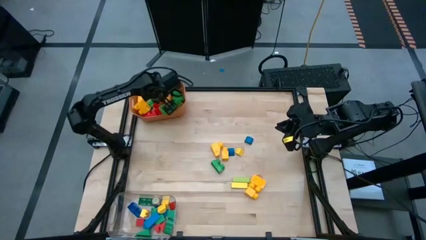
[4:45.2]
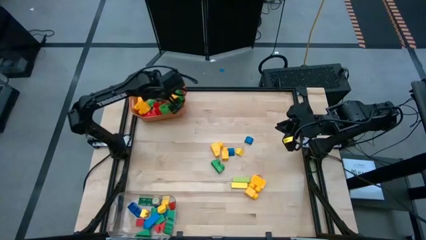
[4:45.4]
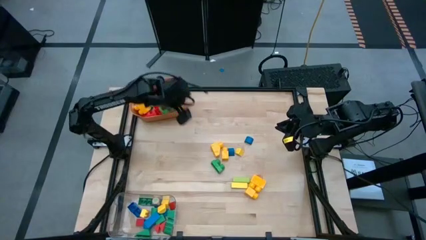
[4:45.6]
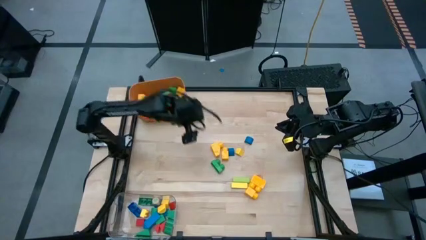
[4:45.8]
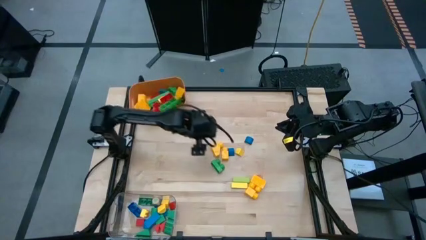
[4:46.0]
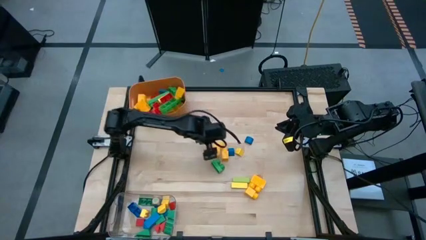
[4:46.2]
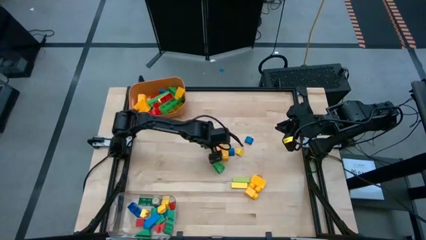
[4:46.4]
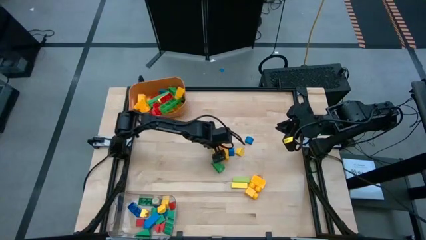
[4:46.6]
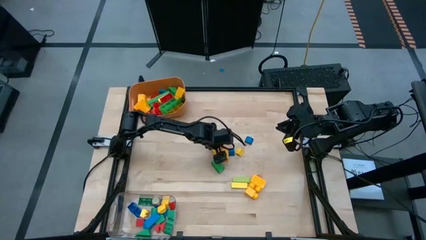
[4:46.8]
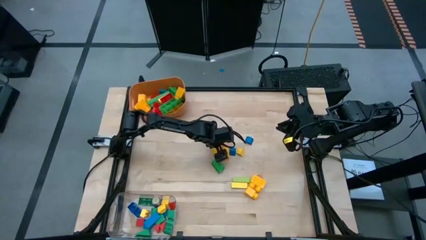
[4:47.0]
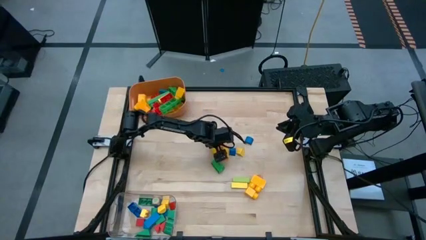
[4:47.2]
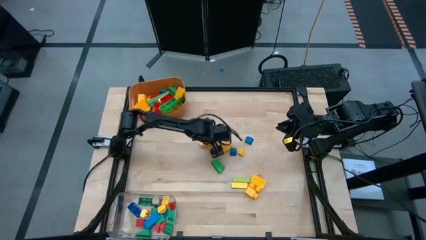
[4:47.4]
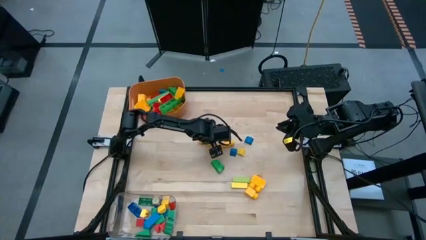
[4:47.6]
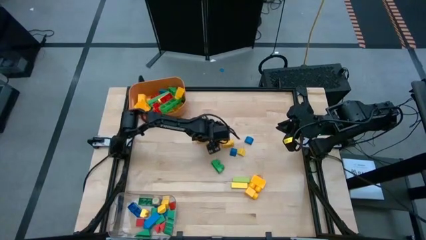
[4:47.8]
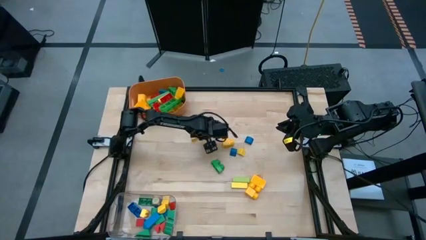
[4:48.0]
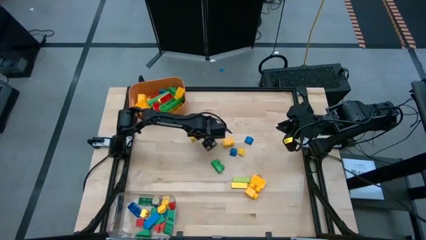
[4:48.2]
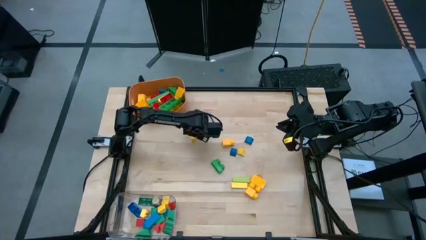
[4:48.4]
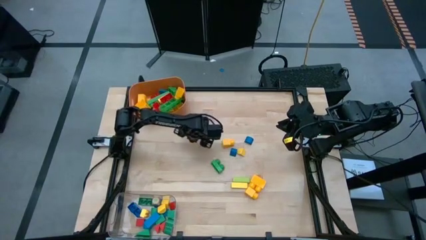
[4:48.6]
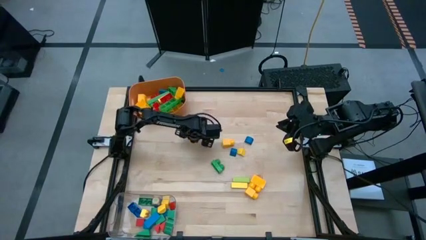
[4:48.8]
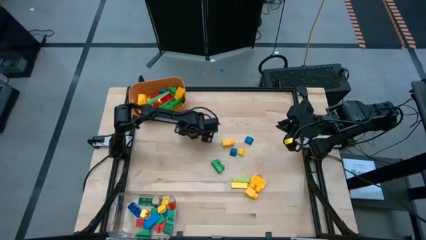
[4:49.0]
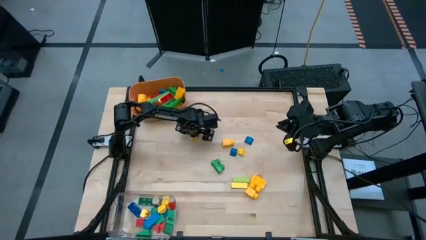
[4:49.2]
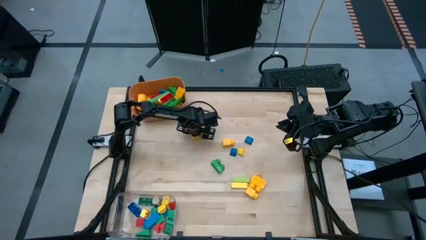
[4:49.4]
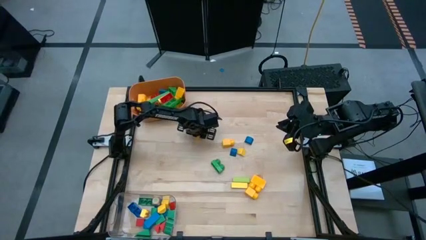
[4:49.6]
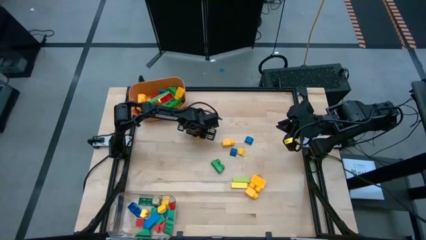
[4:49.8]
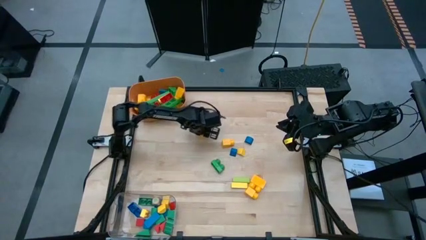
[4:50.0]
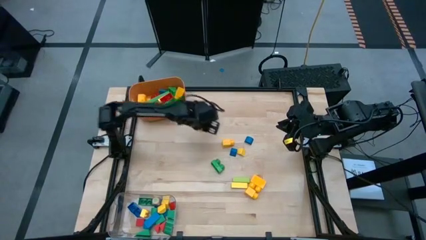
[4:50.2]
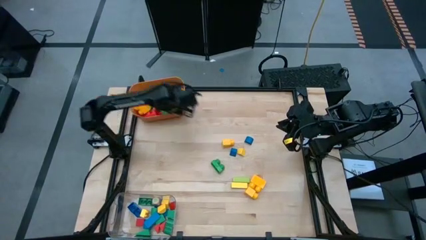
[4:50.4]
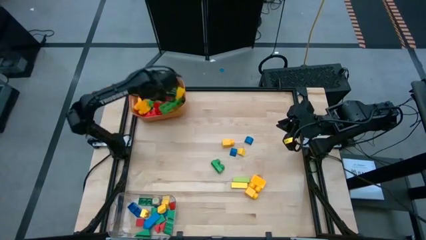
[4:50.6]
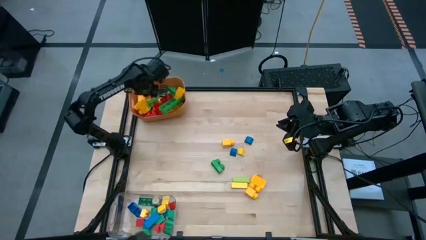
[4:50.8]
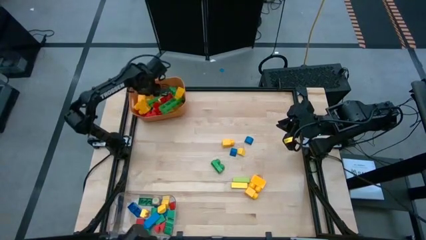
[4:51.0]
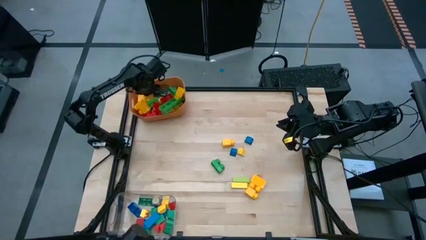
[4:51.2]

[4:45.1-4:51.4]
Task: Sort blocks by size
Put the big yellow game piece into the orange bin

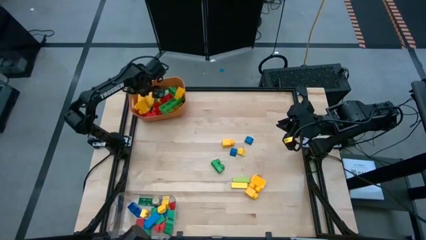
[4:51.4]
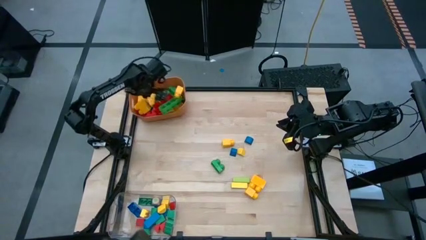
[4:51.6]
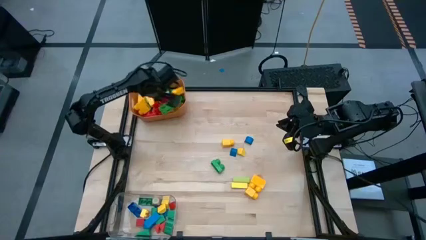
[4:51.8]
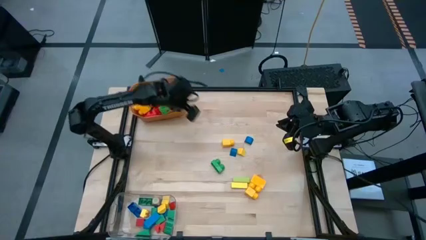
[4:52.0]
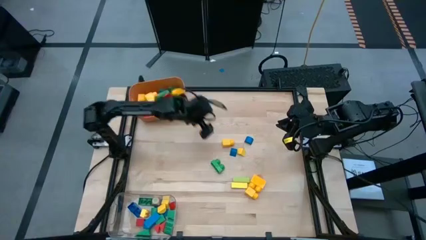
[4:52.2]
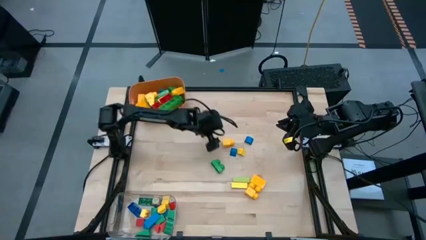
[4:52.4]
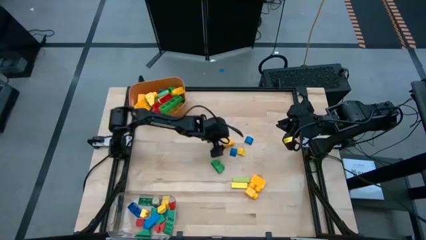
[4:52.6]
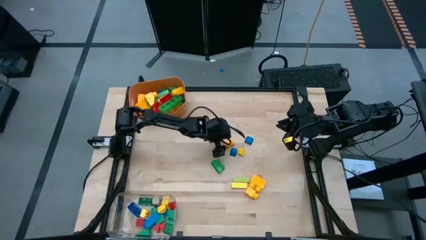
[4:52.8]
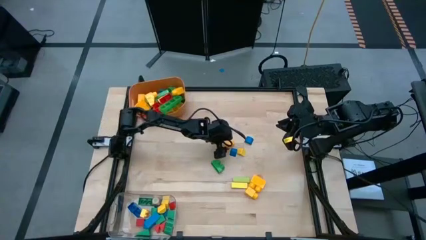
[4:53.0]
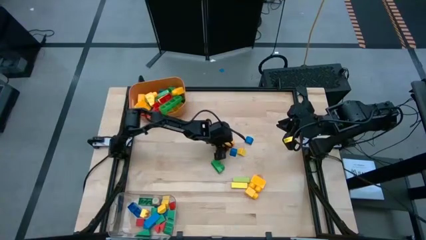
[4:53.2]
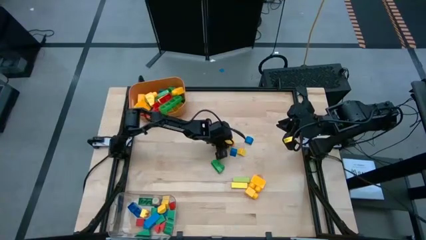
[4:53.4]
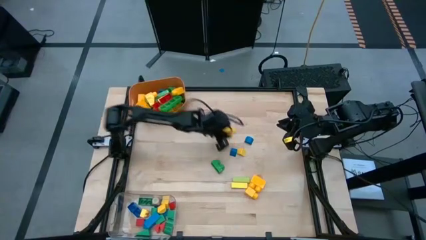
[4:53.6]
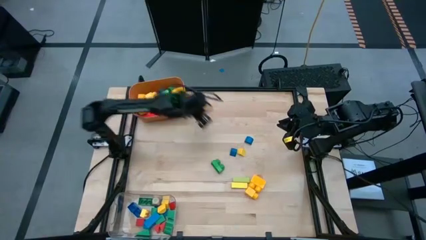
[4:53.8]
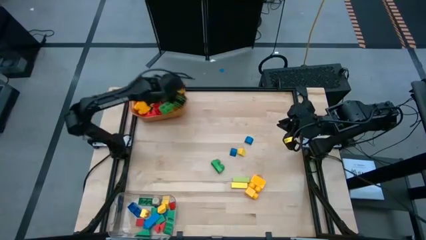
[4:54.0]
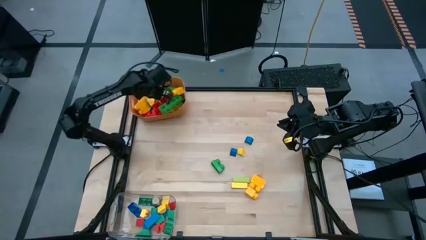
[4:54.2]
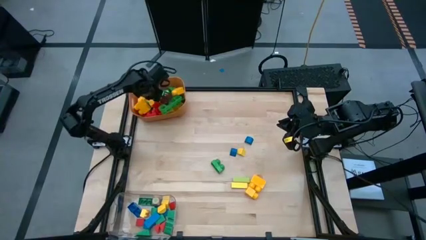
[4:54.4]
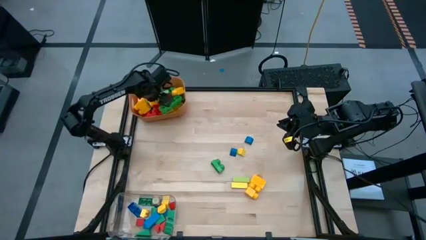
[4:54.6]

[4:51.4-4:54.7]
Put the big yellow game piece into the orange bin

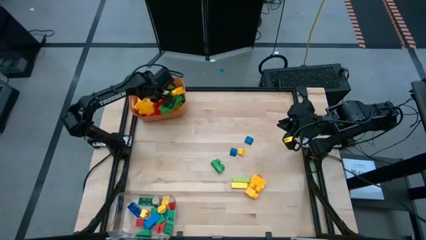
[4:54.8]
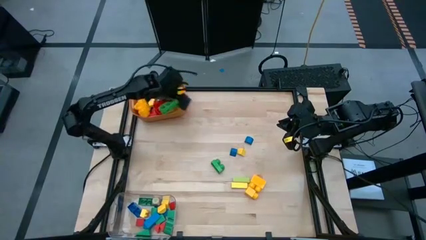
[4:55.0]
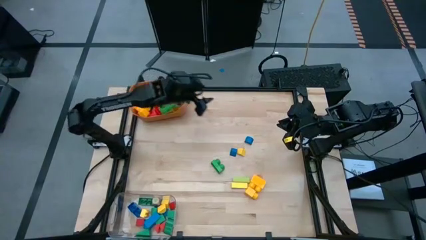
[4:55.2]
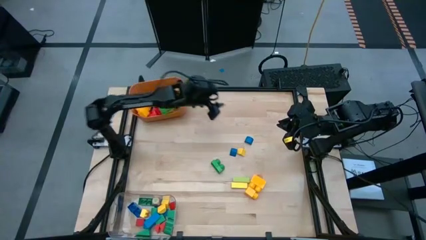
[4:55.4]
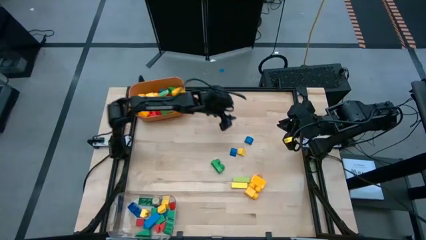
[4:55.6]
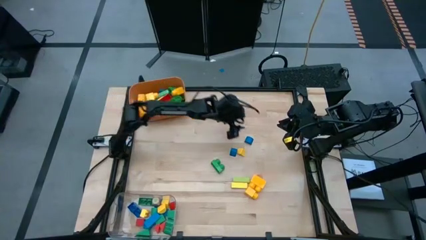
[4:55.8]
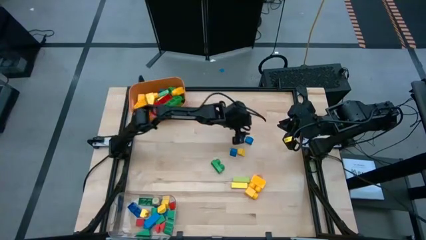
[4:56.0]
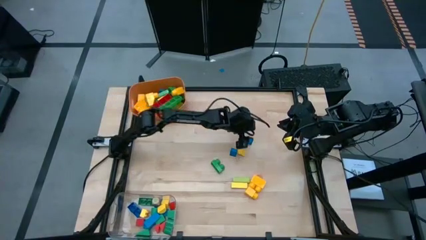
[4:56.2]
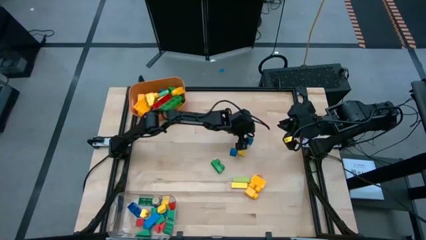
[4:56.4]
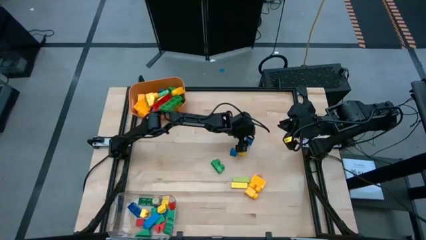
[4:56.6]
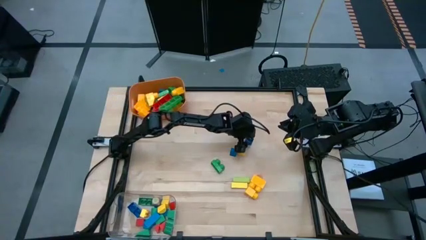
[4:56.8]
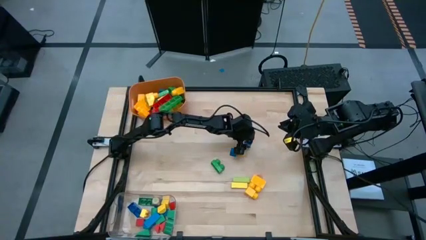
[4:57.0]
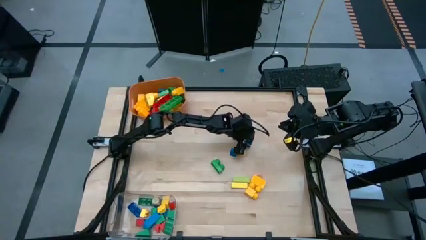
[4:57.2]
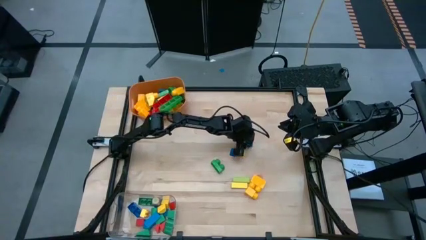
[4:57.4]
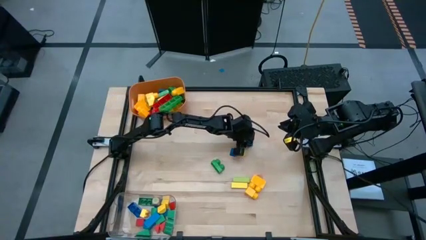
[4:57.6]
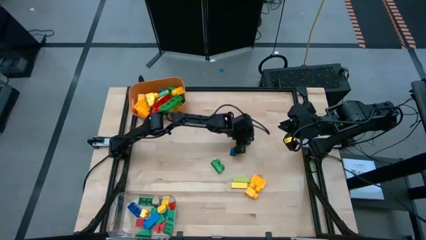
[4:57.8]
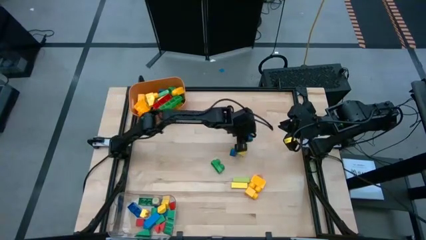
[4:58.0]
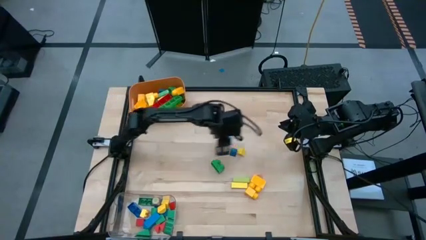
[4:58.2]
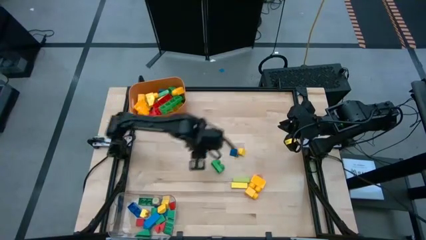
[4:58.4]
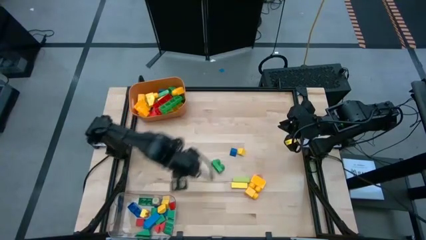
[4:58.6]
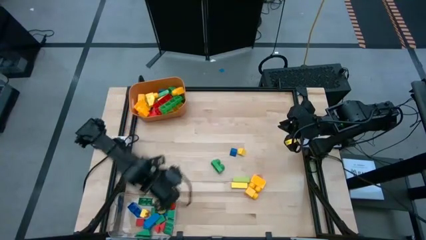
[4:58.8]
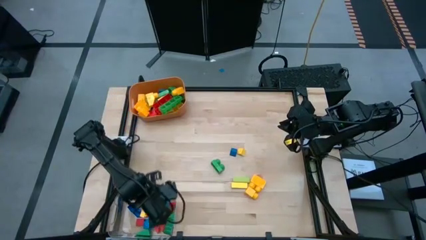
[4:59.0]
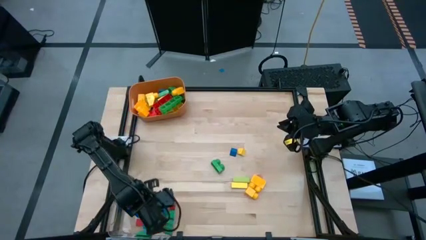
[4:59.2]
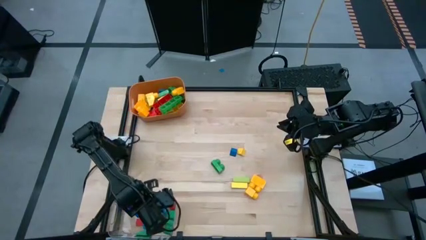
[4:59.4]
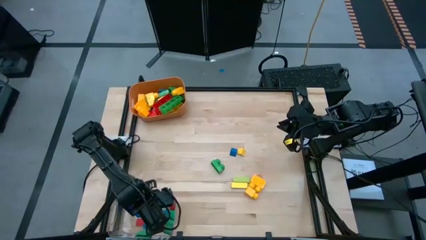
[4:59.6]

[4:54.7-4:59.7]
Put the small blue block into the transparent bin

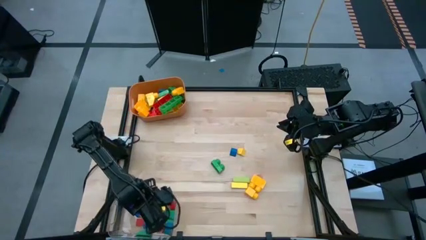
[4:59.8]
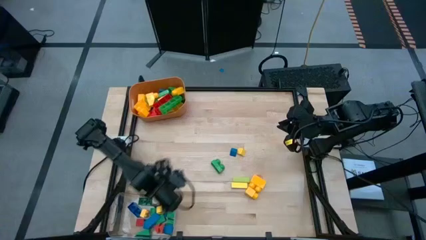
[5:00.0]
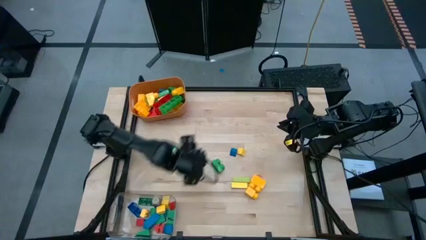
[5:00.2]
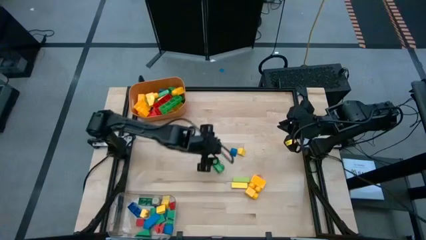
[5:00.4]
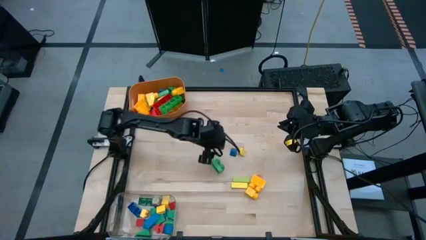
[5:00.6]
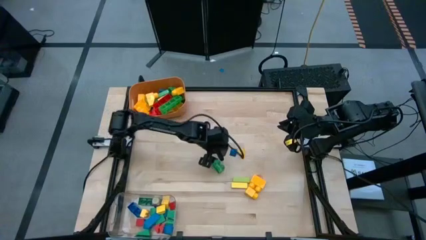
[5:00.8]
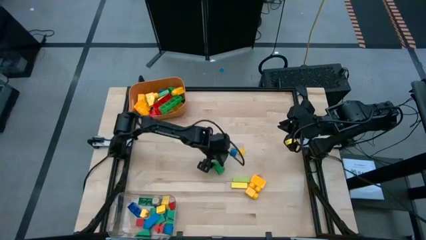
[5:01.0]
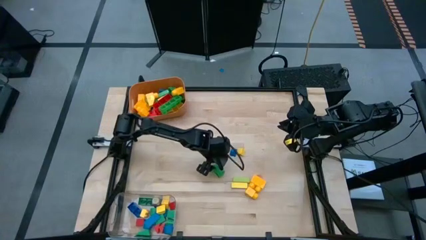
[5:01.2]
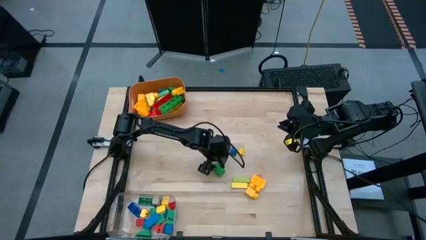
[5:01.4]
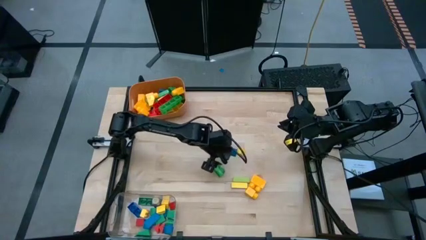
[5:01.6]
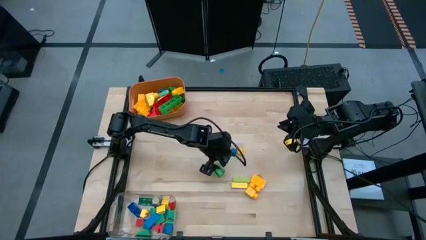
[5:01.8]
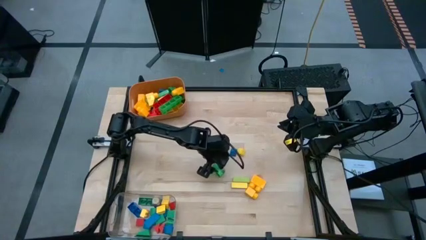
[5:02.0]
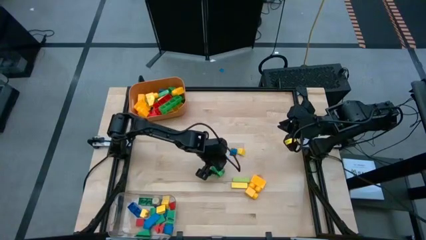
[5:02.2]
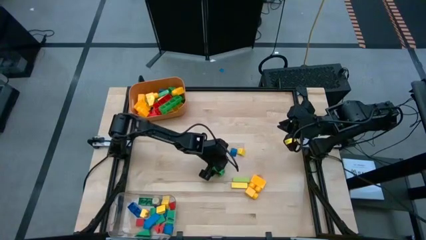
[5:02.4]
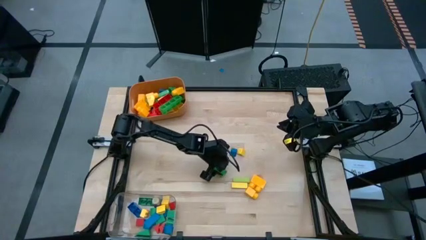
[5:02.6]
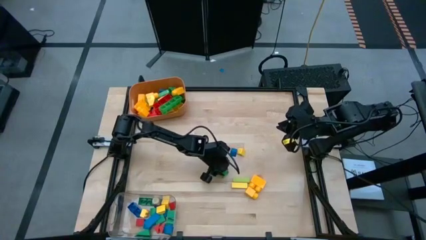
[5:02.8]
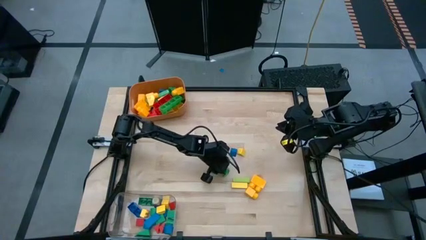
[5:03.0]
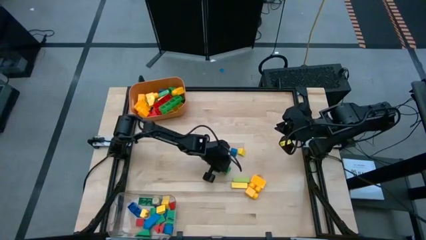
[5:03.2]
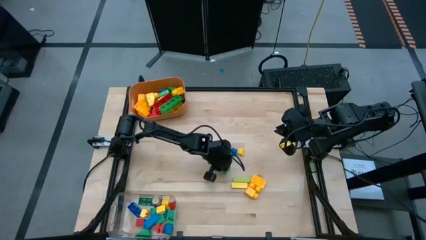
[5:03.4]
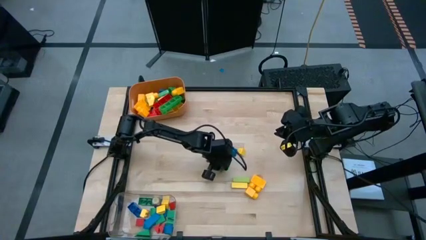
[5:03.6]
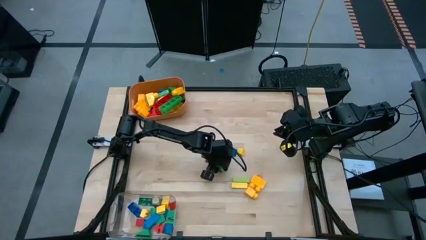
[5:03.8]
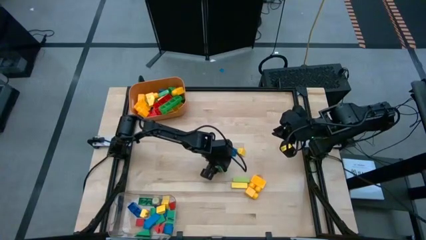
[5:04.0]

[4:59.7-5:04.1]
Put the big green game piece into the orange bin
